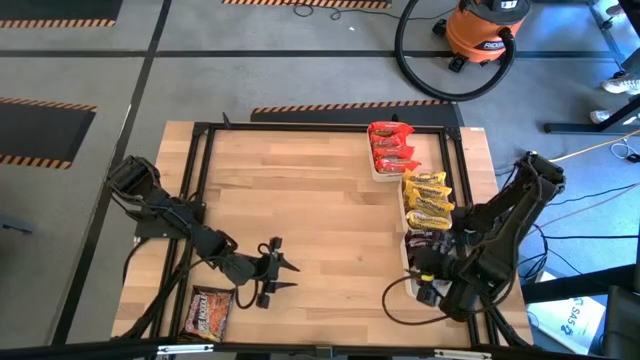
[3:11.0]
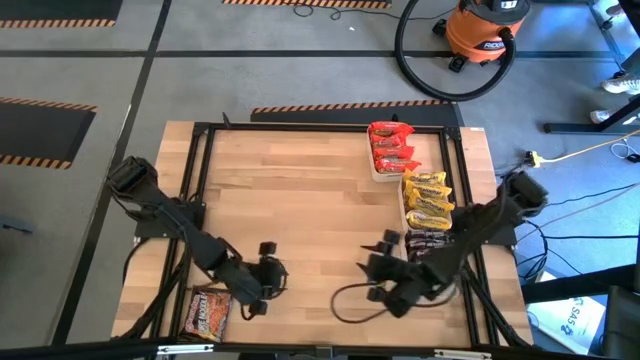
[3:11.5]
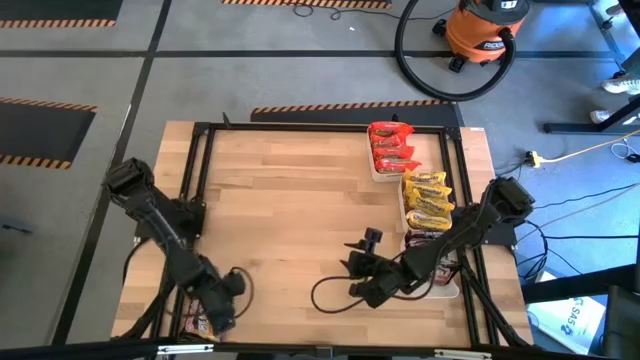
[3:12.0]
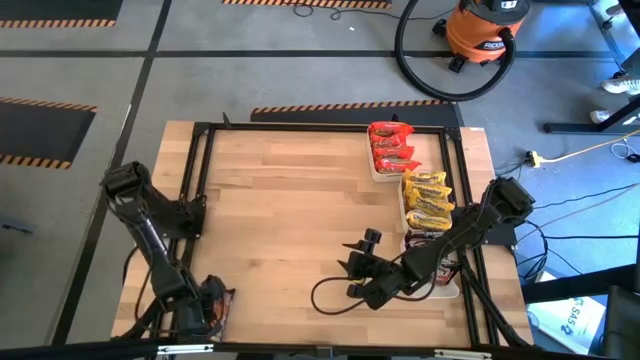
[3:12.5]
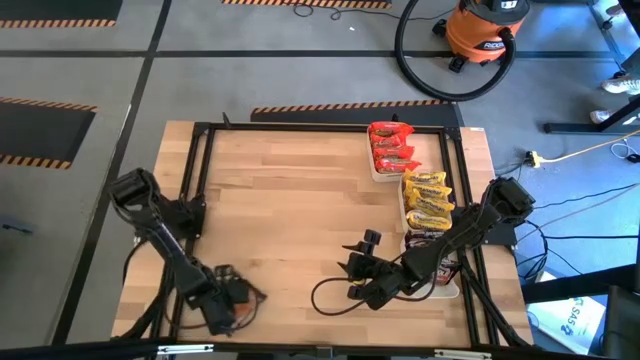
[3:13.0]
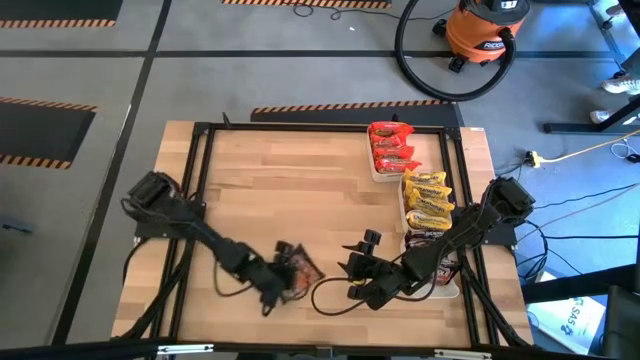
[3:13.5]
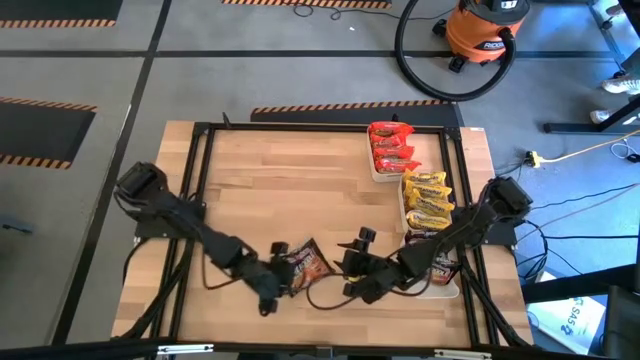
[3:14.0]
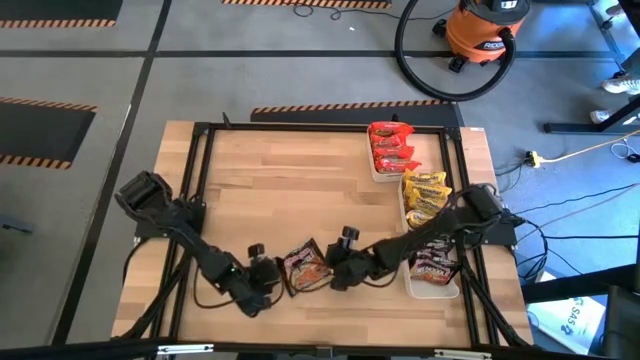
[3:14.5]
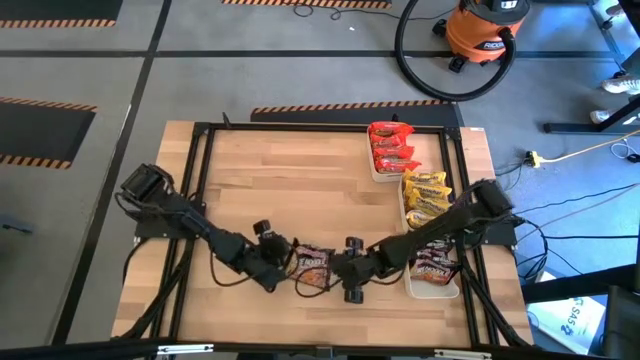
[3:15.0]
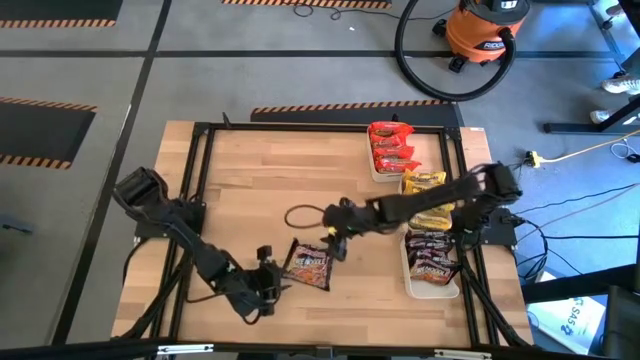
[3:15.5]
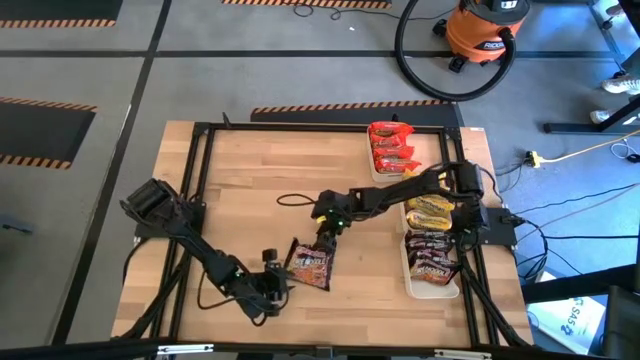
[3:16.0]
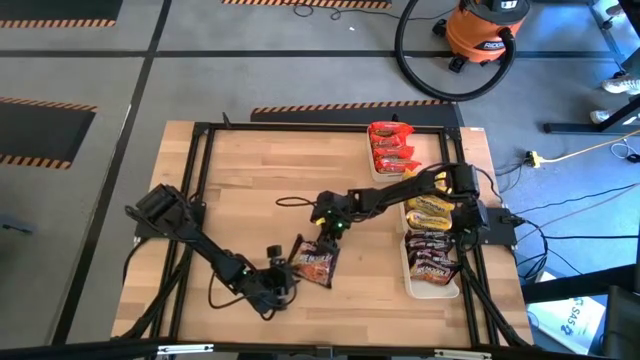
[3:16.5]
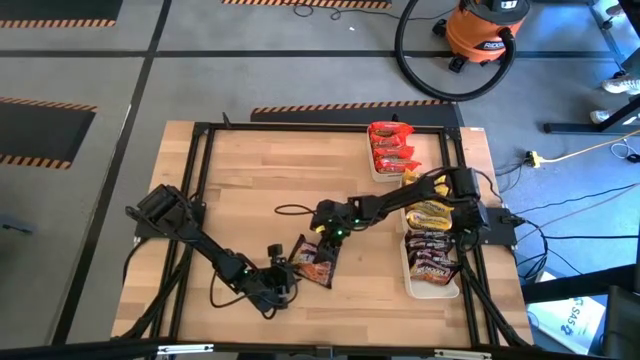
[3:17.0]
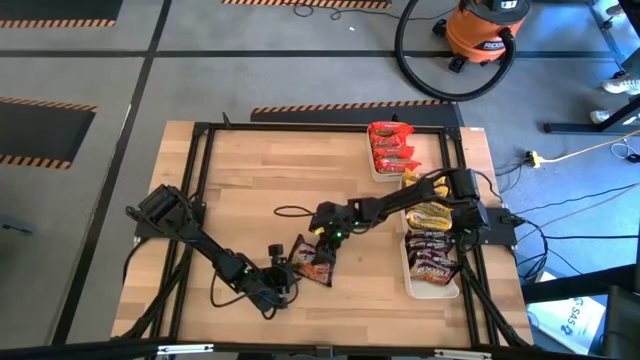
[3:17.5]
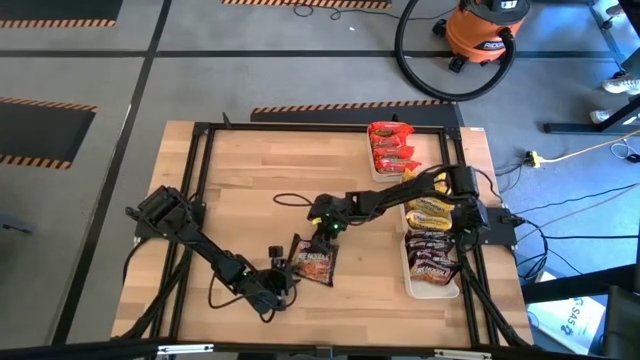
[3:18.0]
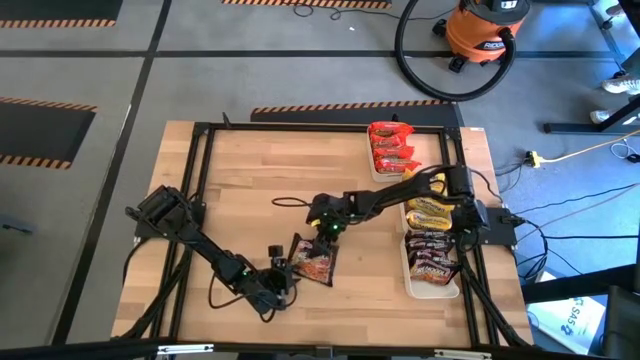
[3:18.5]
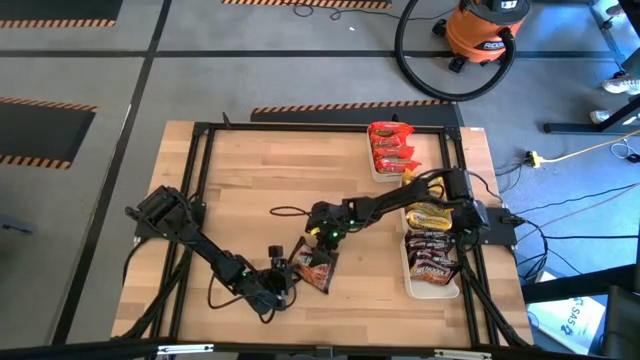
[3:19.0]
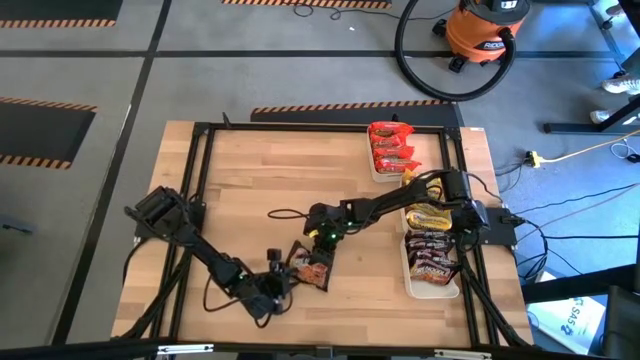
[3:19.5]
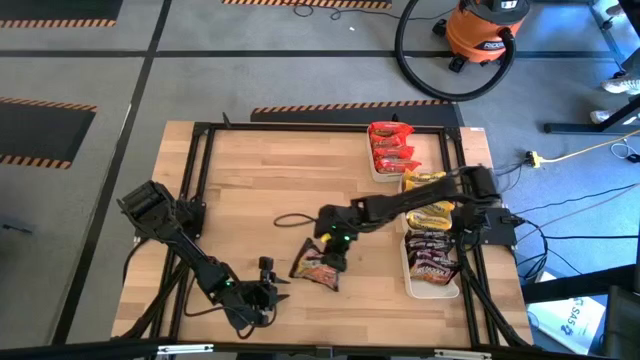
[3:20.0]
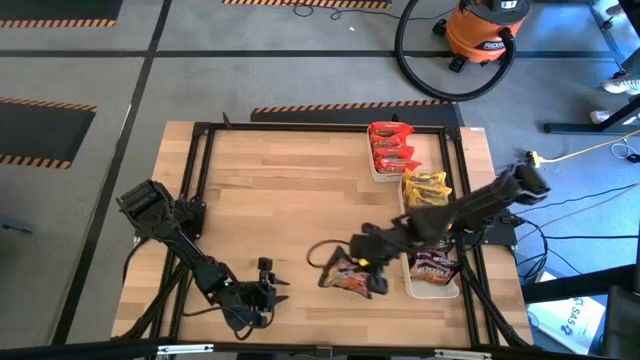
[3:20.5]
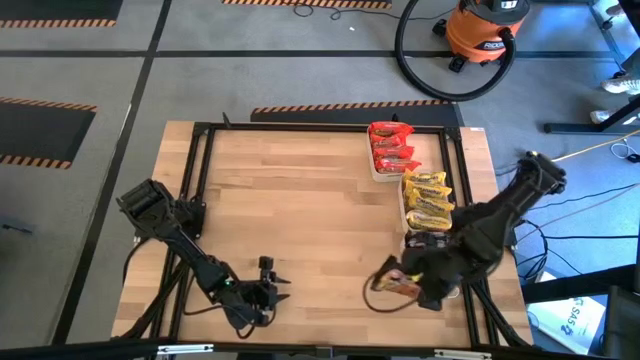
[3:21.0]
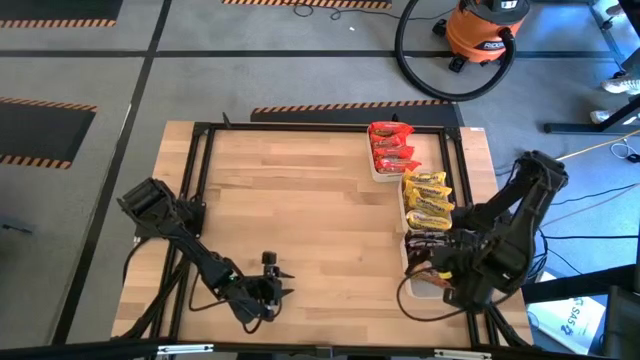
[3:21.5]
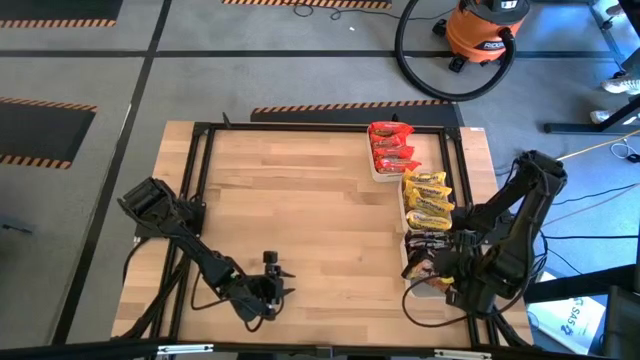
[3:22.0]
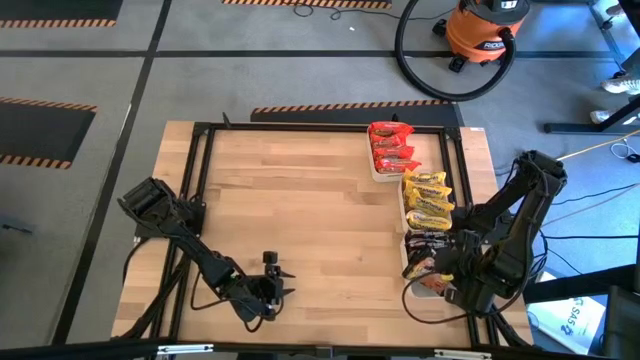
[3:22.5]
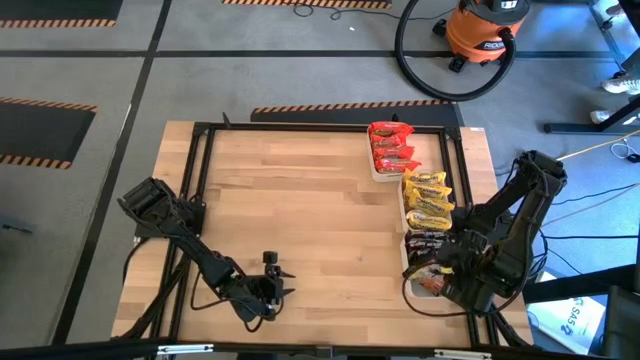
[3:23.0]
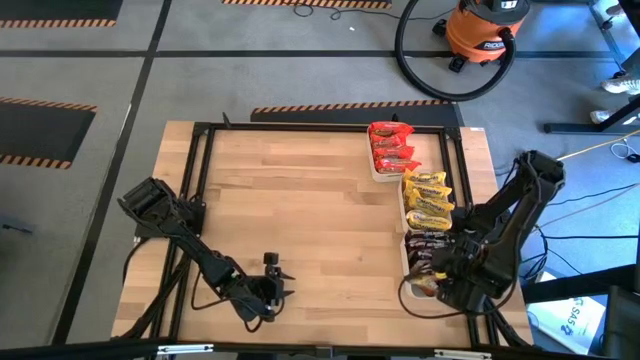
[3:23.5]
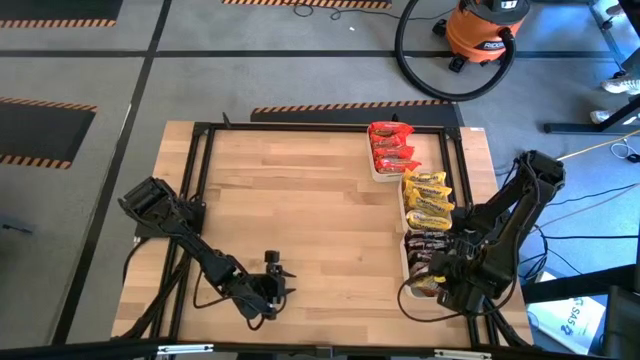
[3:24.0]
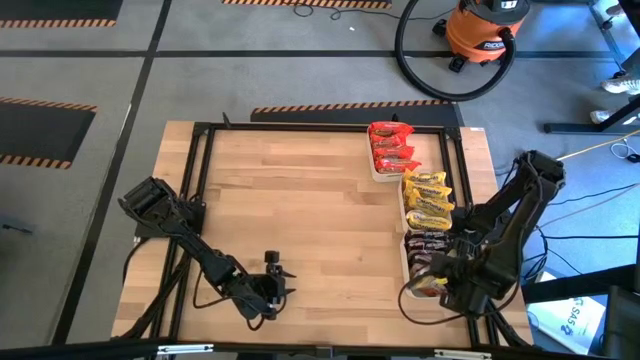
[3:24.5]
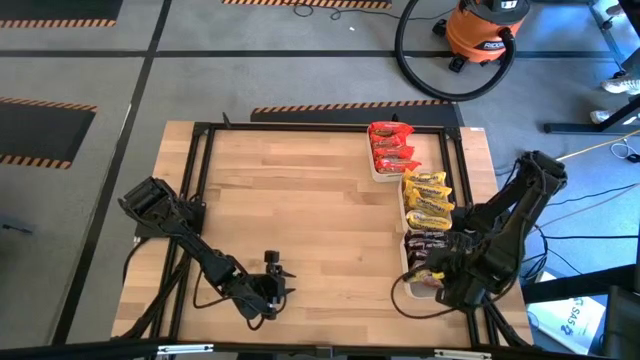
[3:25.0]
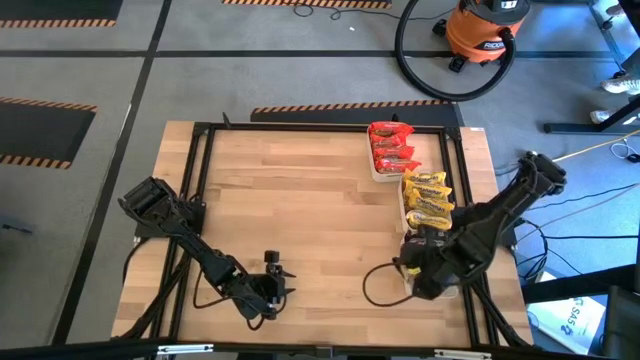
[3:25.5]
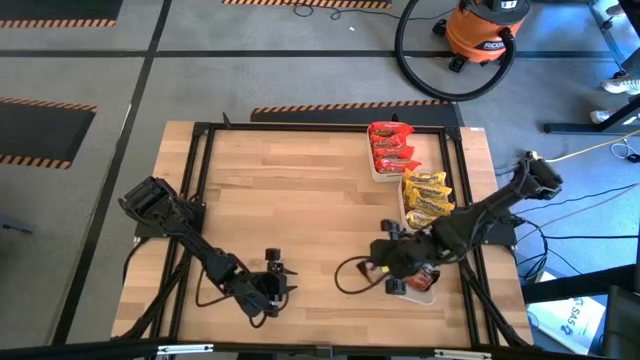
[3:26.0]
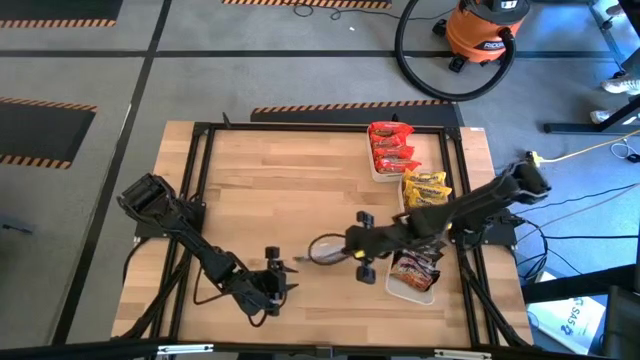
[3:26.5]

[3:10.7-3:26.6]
Task: Sort Maruchan noodles
Put the black noodle pack into the bottom white bin

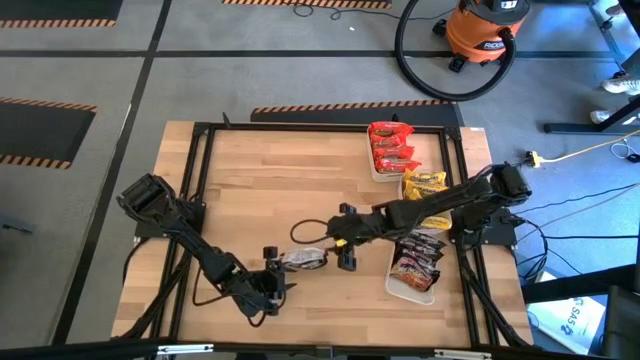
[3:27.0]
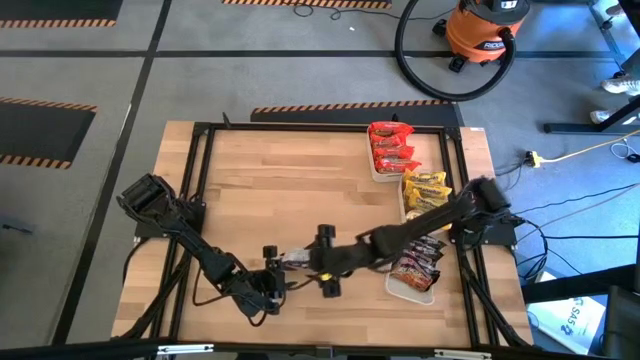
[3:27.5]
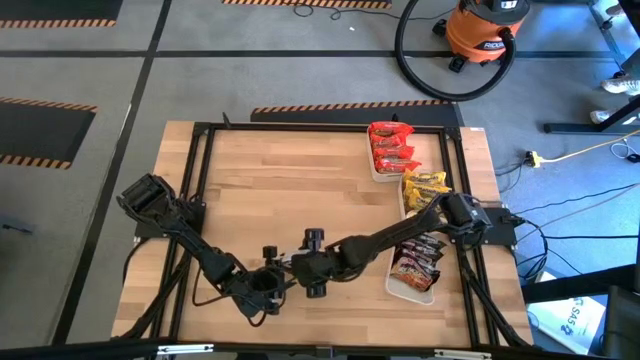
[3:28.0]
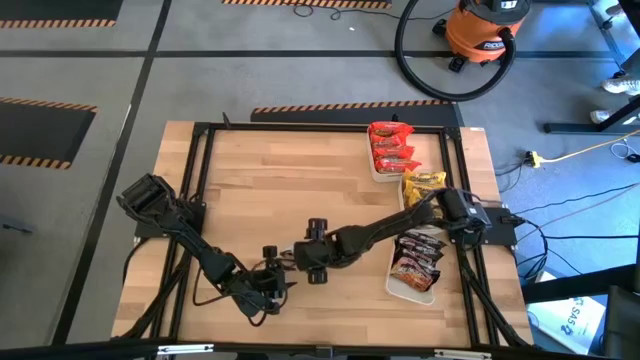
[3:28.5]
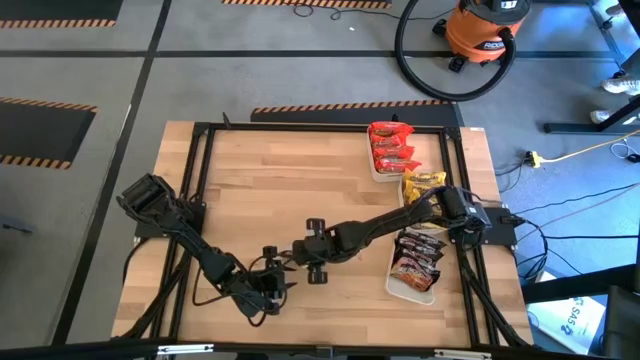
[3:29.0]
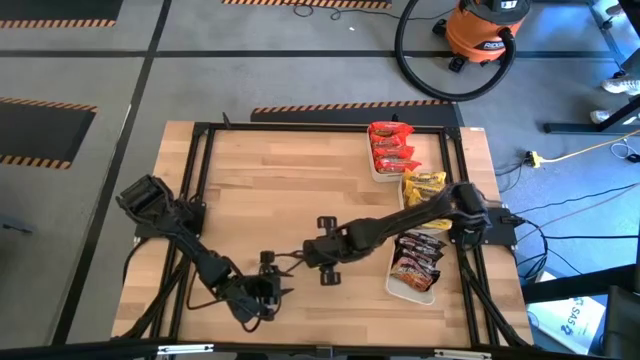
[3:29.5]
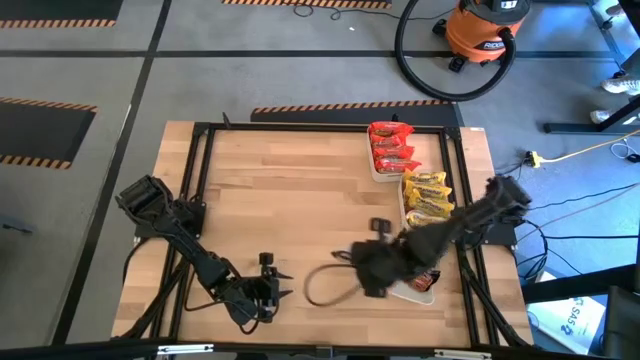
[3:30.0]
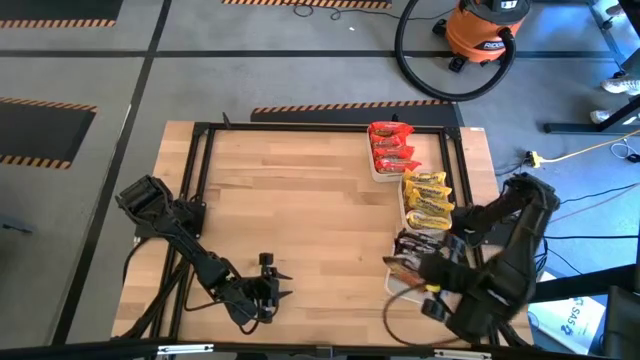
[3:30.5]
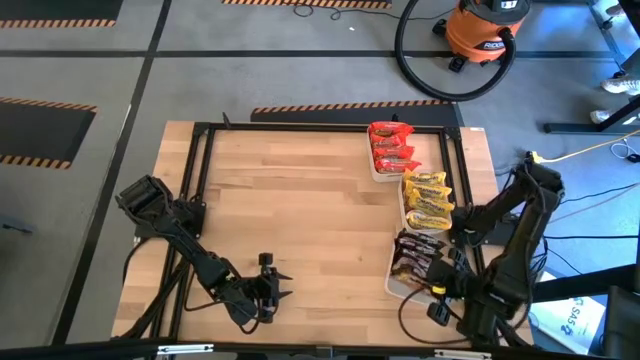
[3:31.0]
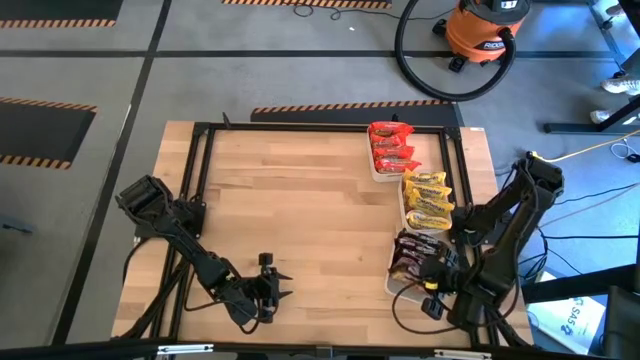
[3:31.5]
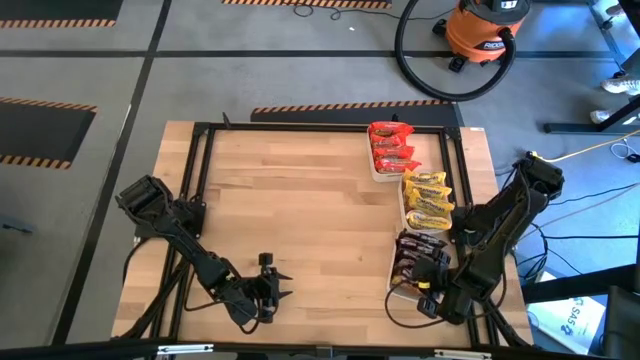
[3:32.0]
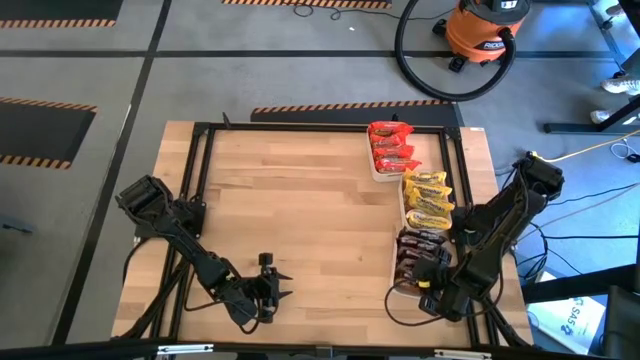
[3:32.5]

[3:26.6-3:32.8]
Put the black noodle pack into the bottom white bin

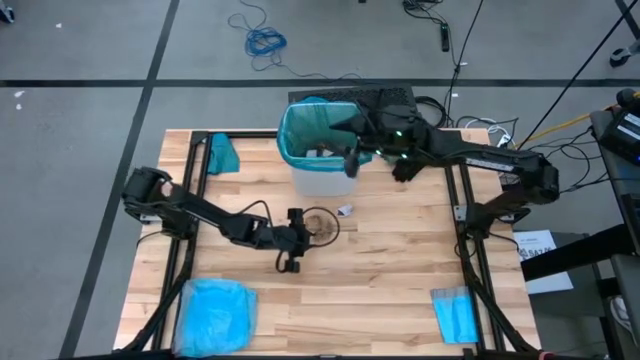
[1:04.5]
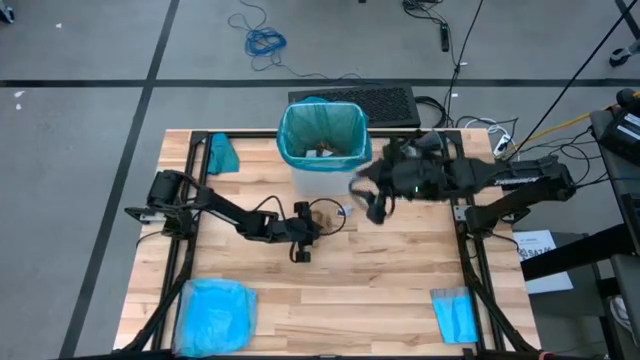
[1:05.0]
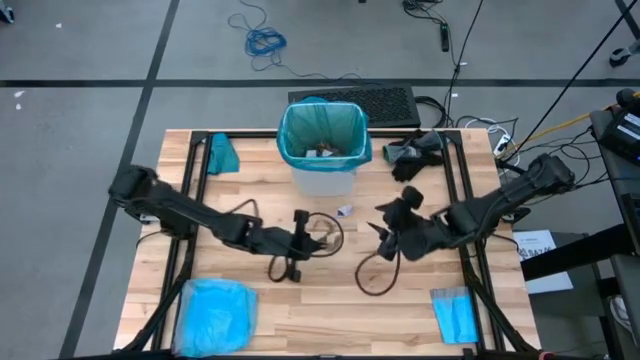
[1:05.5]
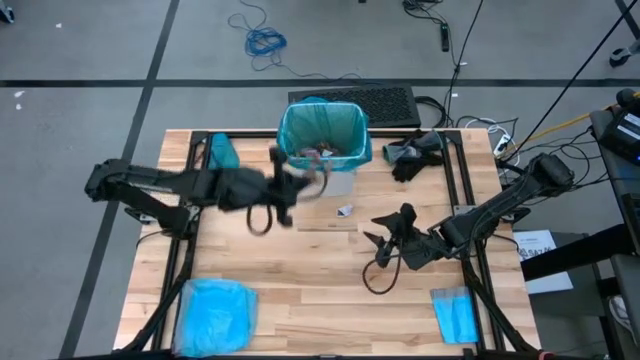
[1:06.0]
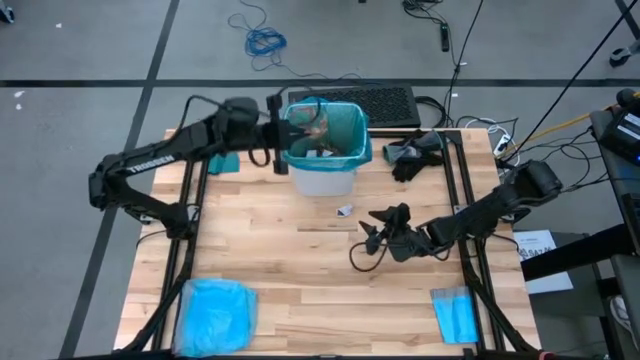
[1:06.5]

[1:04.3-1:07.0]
Task: place trash/remove bag and relplace
Put the brown napkin into the trash bin
